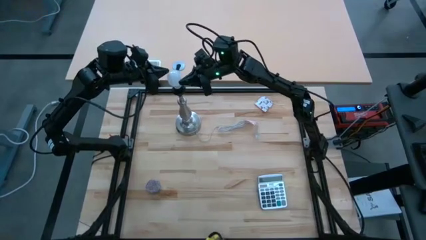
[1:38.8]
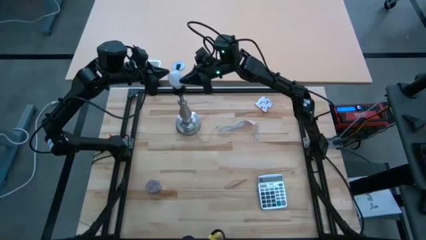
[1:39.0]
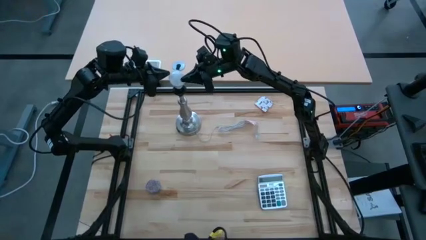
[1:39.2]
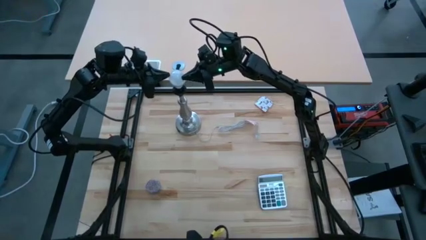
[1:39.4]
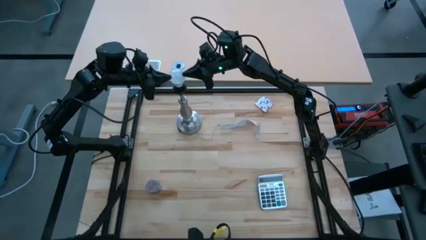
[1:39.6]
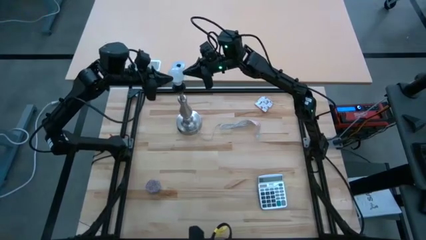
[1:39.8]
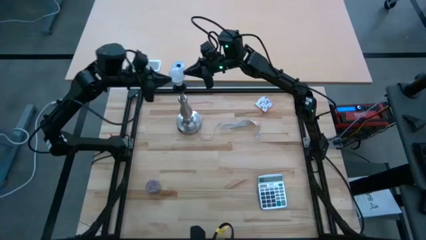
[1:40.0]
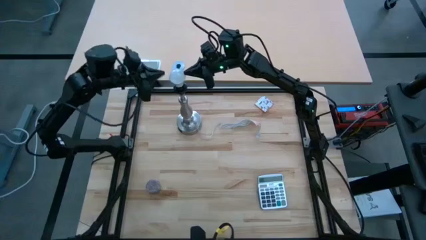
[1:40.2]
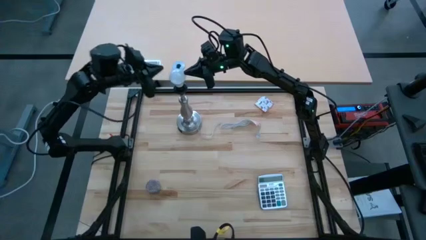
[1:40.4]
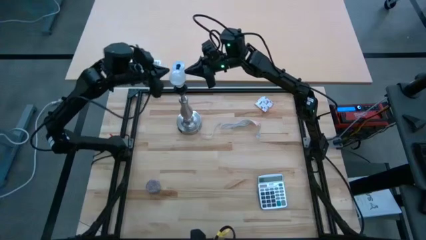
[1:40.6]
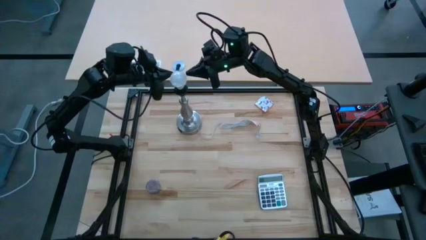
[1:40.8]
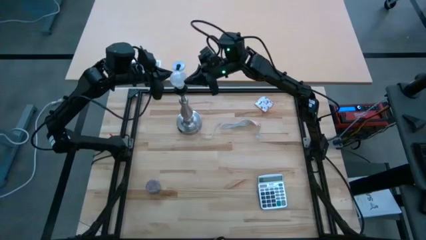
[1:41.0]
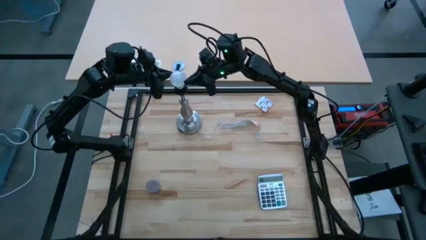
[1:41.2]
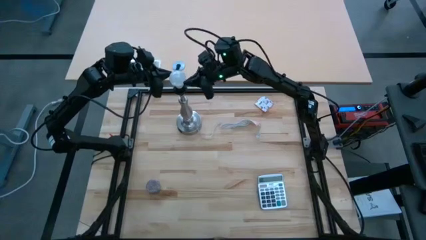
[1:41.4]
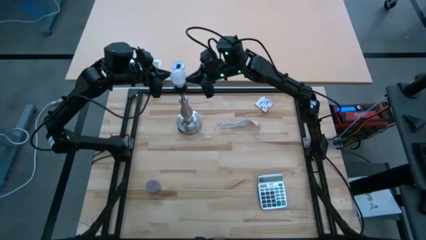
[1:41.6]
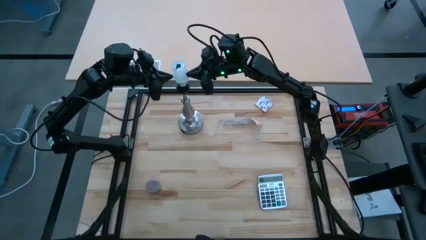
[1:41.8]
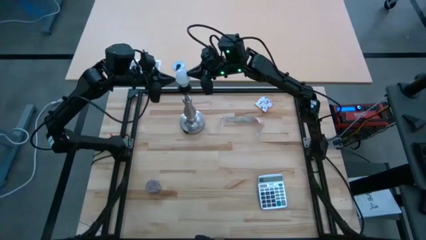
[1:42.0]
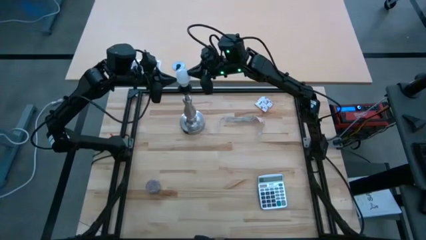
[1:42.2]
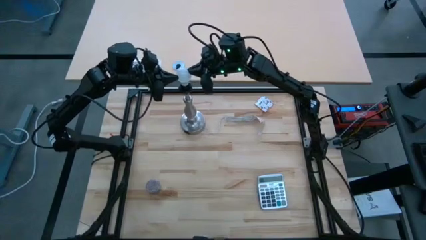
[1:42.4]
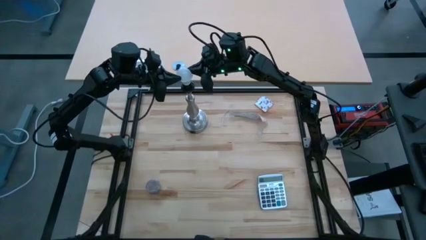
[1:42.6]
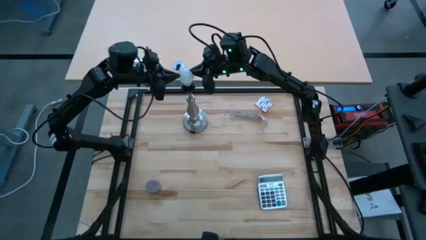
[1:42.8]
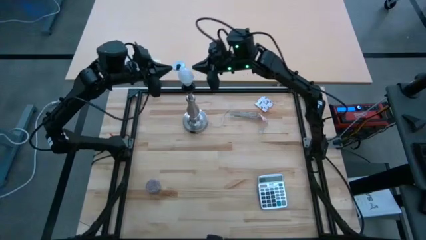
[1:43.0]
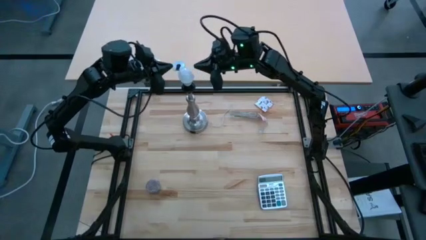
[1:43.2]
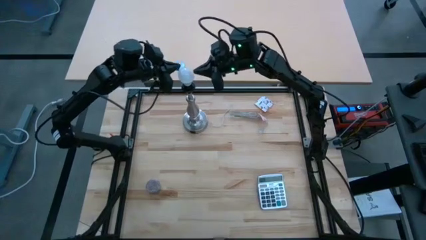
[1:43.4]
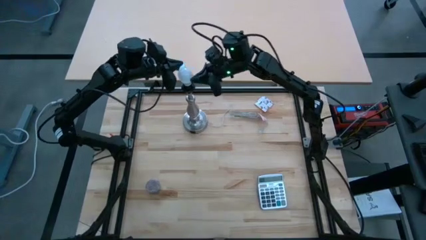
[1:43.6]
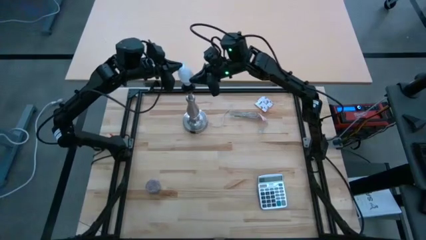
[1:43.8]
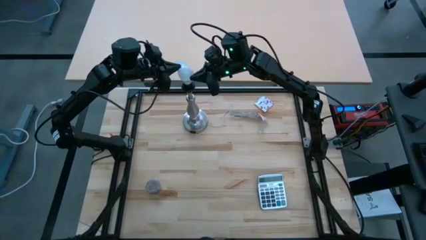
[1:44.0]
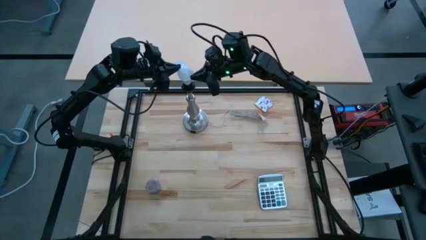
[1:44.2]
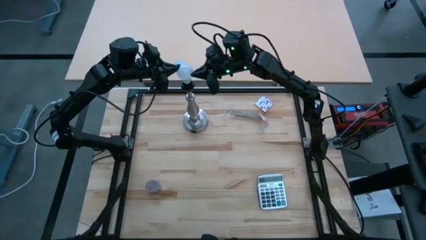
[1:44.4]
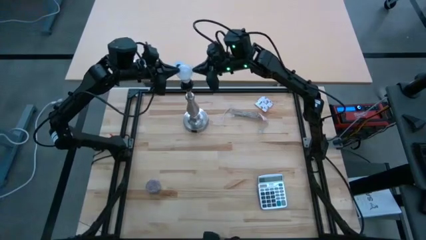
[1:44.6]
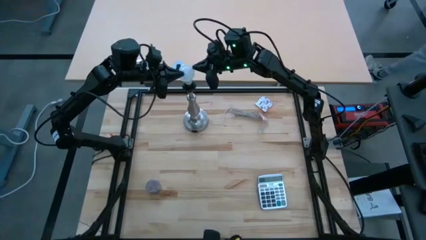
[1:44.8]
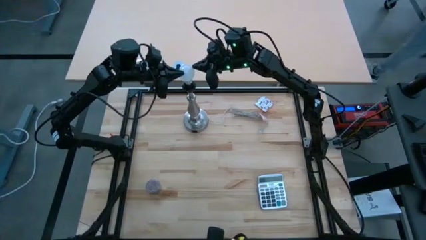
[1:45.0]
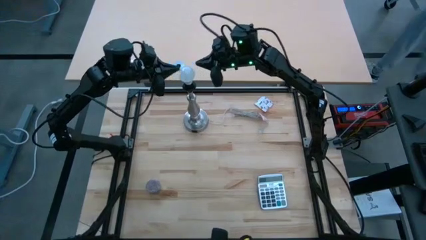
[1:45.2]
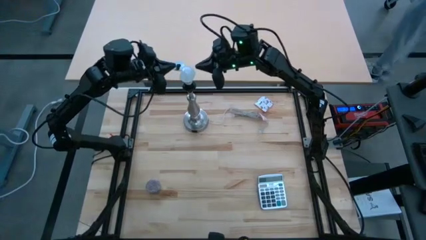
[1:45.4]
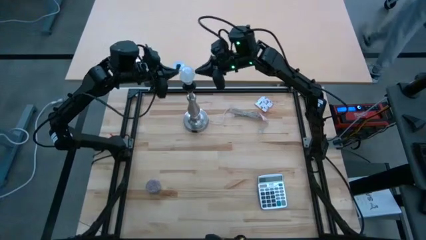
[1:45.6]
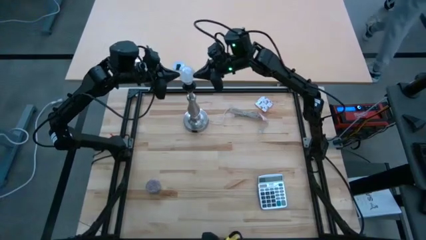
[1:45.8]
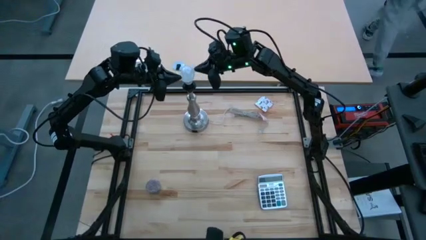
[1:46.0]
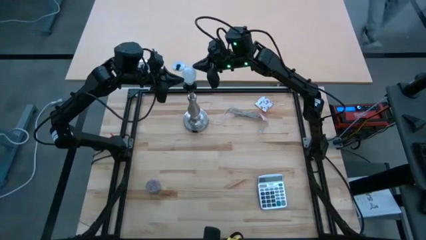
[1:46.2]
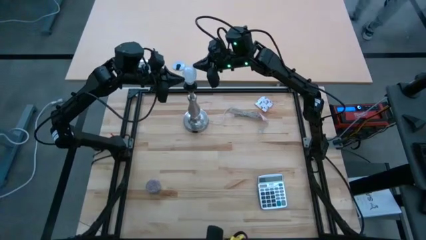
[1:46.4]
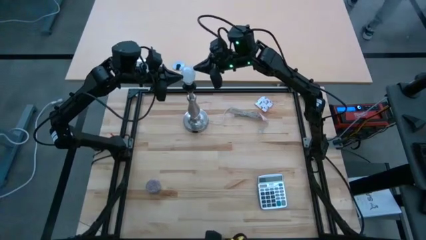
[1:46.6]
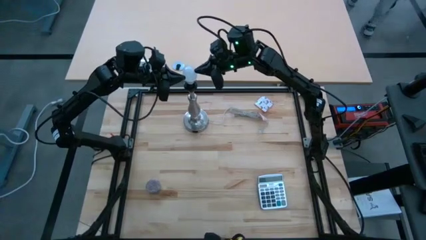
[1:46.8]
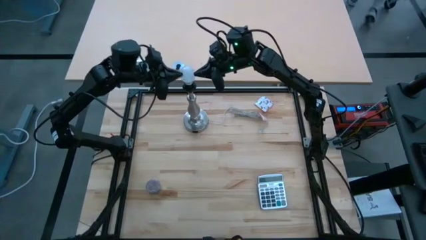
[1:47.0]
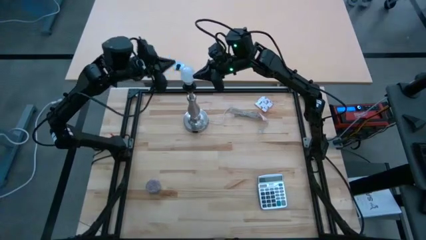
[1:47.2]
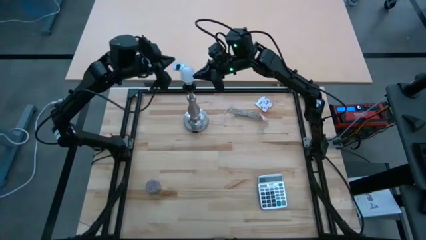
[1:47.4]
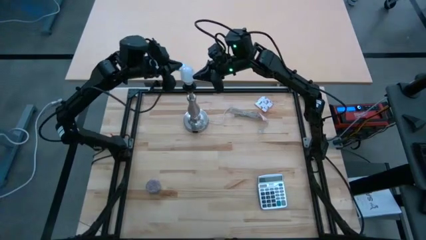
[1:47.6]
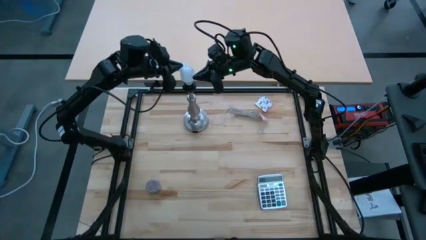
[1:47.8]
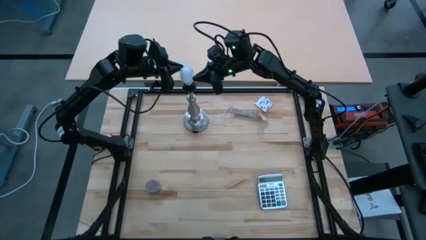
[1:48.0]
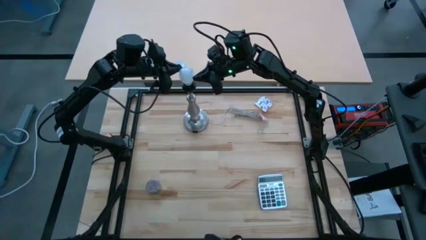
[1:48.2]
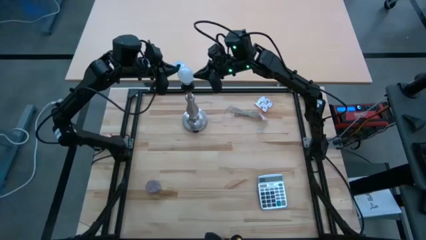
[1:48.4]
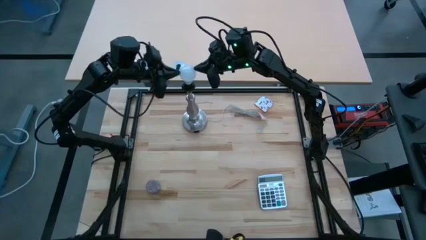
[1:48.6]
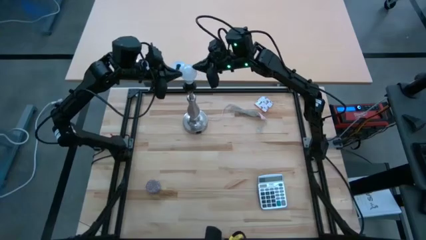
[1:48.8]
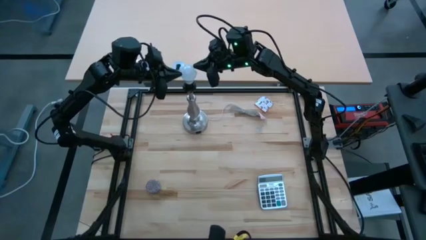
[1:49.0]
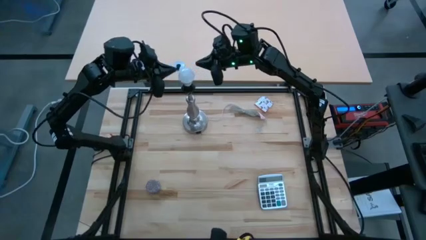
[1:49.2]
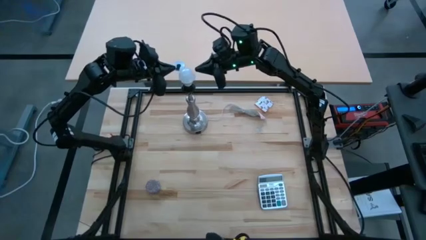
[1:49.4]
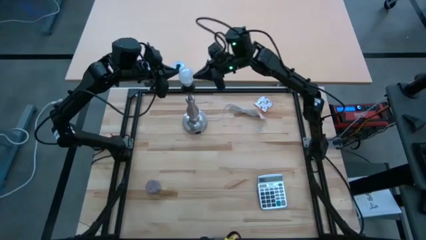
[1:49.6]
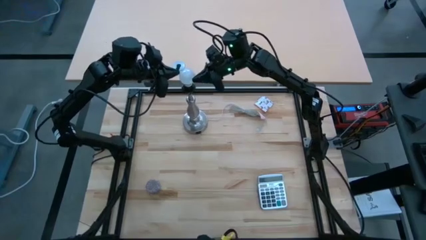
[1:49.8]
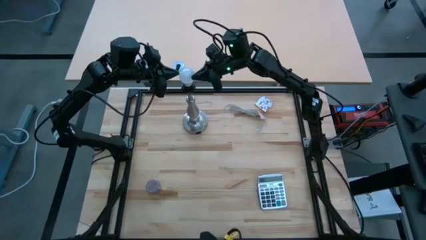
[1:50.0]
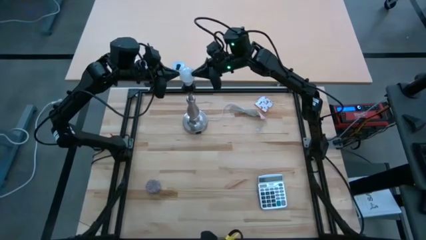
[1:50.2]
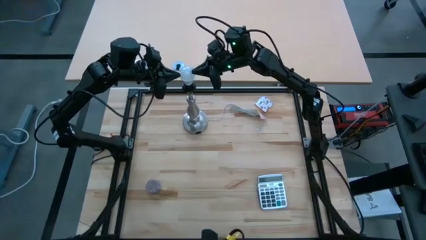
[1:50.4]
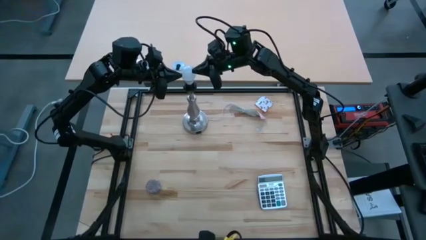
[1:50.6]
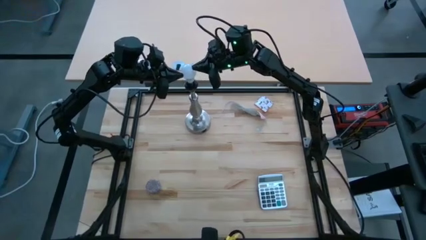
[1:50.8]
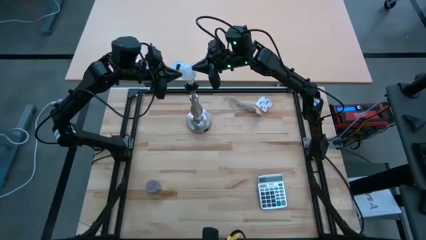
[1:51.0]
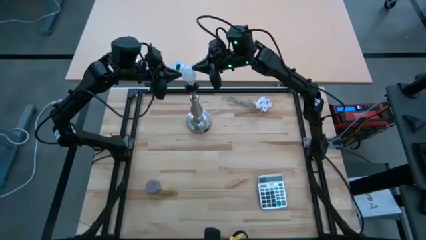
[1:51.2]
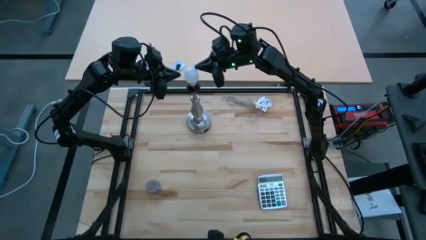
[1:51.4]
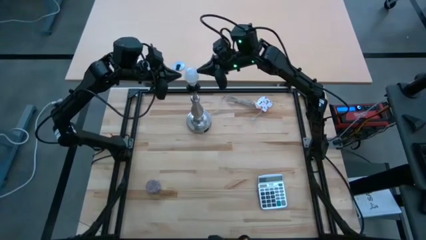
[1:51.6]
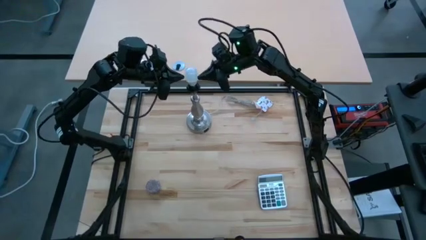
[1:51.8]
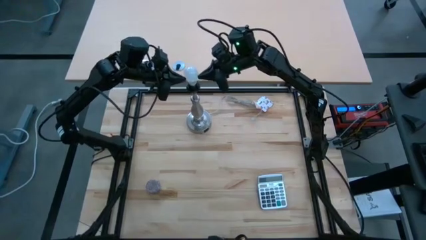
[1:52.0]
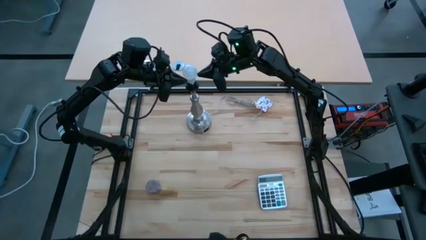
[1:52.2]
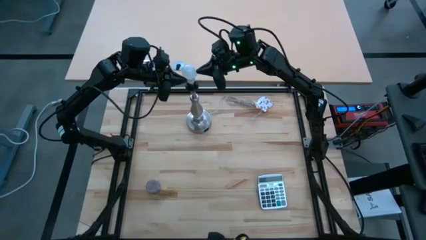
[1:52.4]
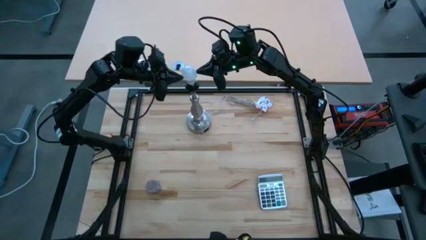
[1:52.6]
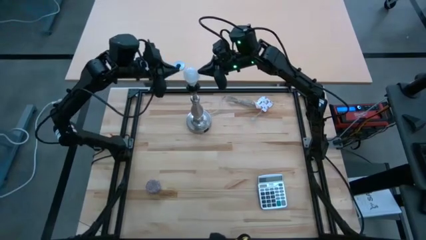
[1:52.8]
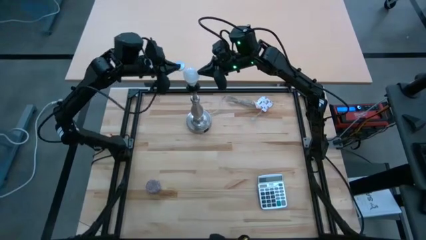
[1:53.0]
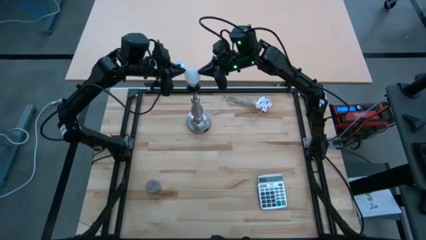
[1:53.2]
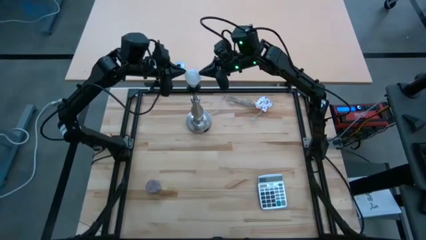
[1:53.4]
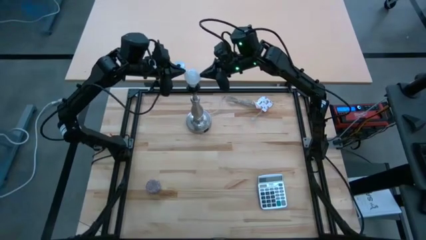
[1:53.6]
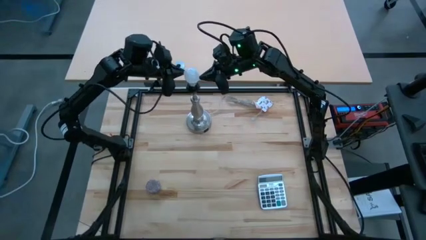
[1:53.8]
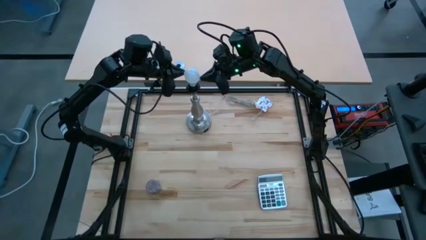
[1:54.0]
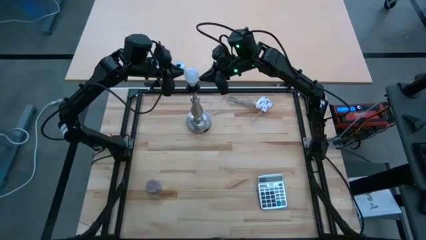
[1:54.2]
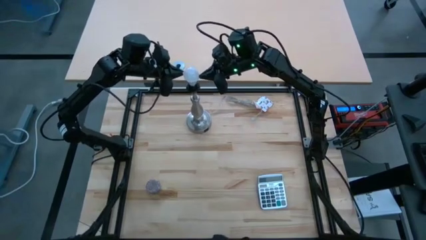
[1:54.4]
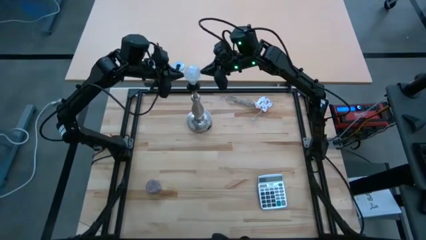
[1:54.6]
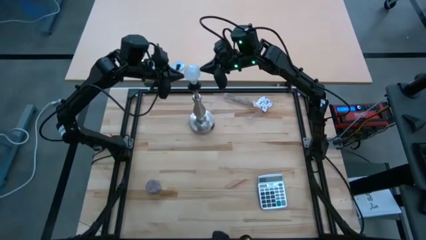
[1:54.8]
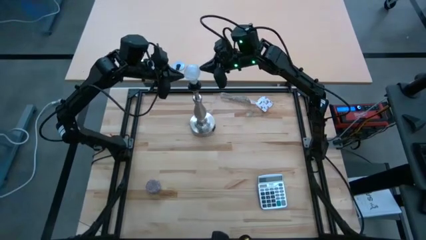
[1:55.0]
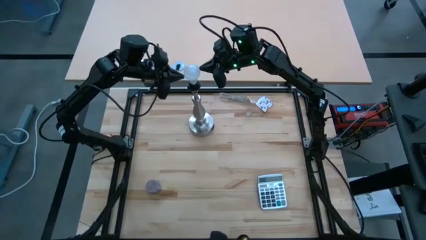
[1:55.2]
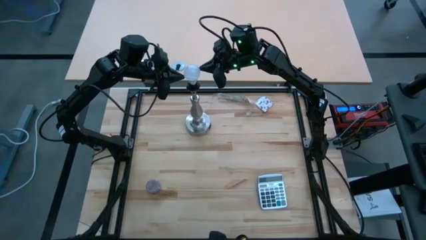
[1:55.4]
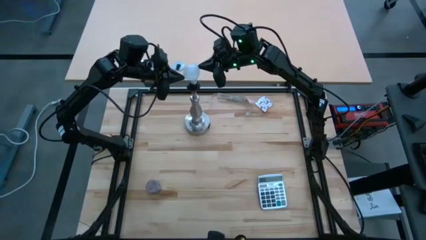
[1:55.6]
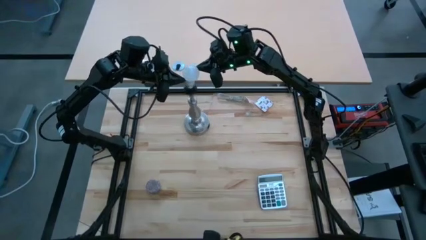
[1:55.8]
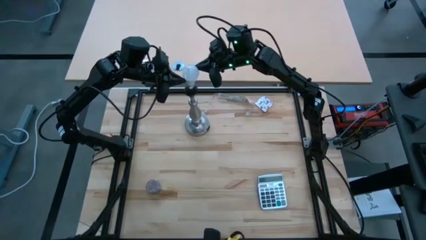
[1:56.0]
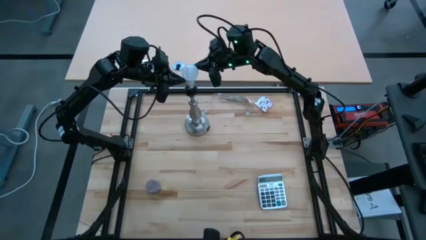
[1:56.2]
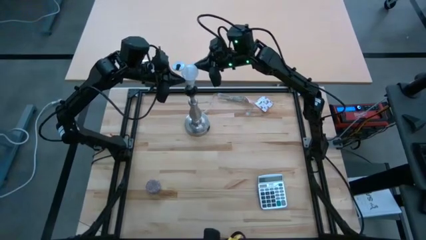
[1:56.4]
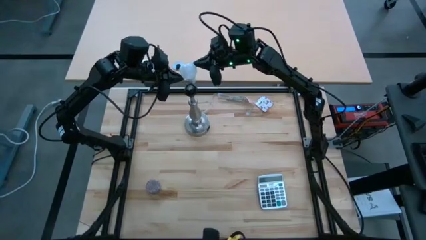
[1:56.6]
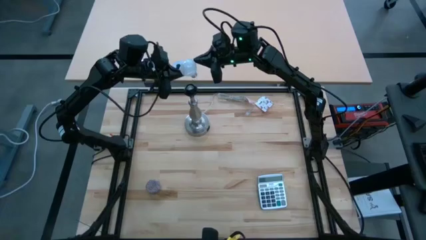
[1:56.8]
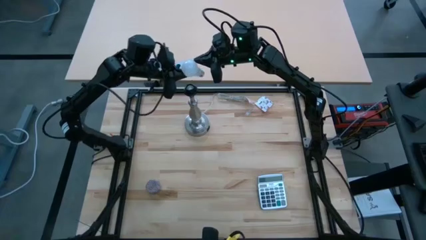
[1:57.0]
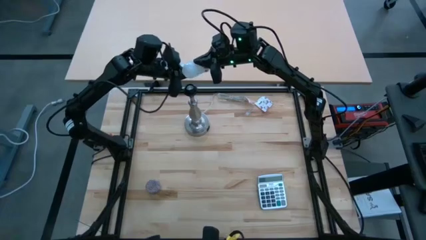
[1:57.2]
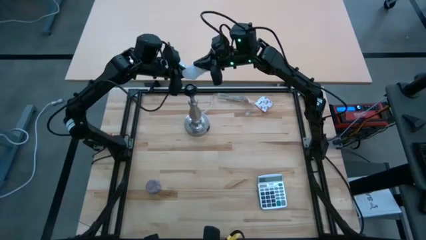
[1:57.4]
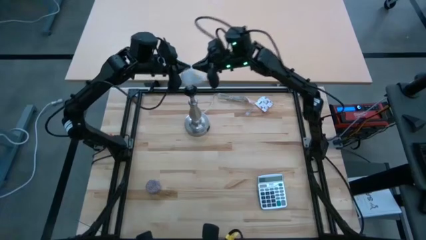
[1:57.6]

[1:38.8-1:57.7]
Task: Screw lightbulb
Remove the lightbulb from the lamp
